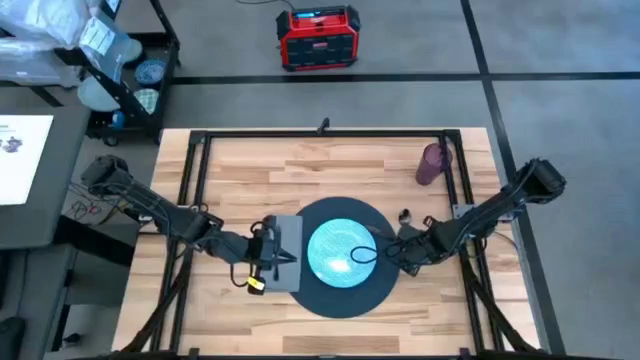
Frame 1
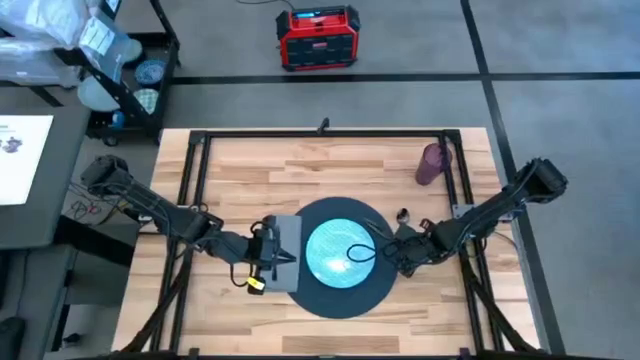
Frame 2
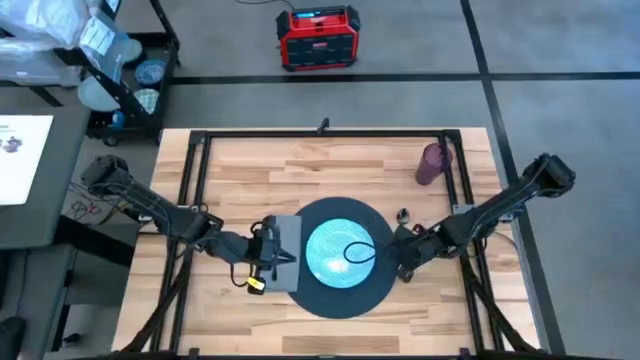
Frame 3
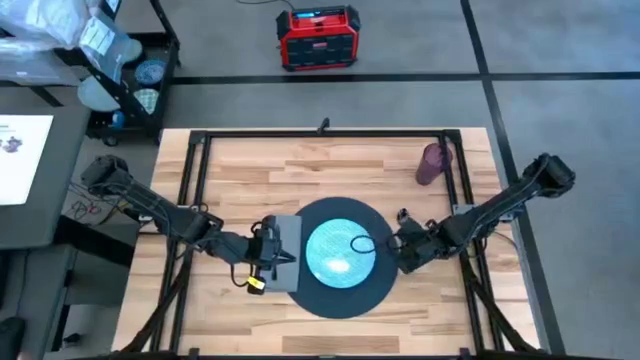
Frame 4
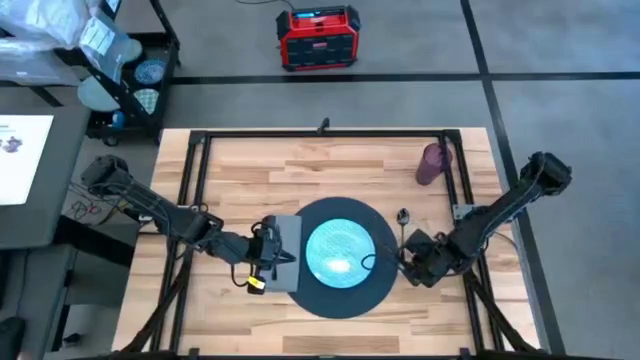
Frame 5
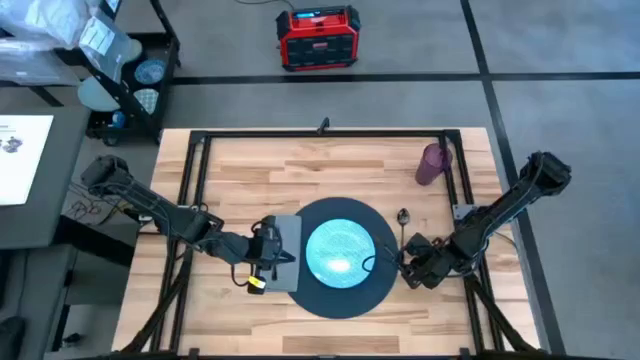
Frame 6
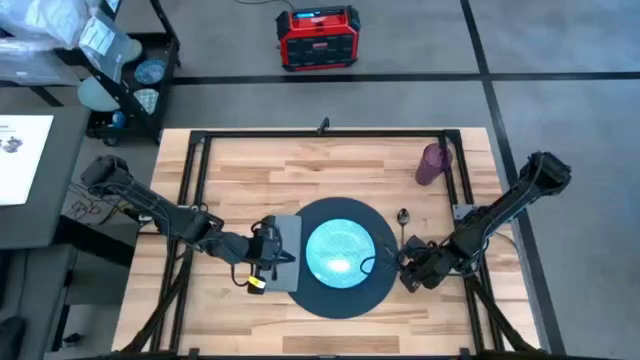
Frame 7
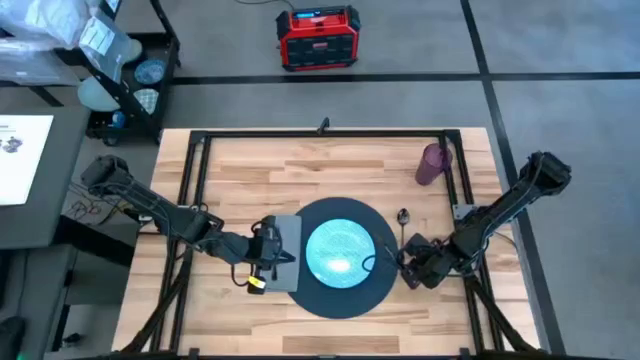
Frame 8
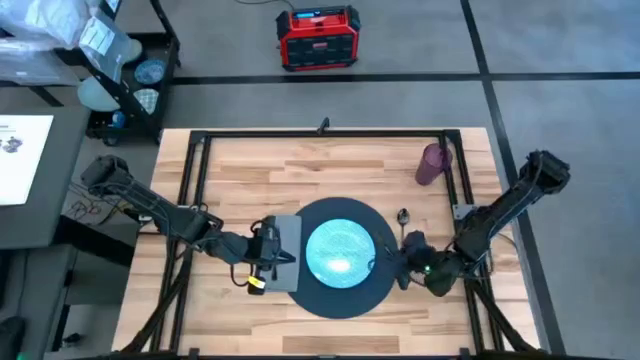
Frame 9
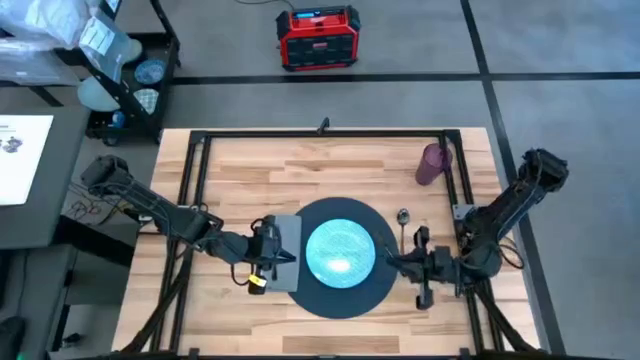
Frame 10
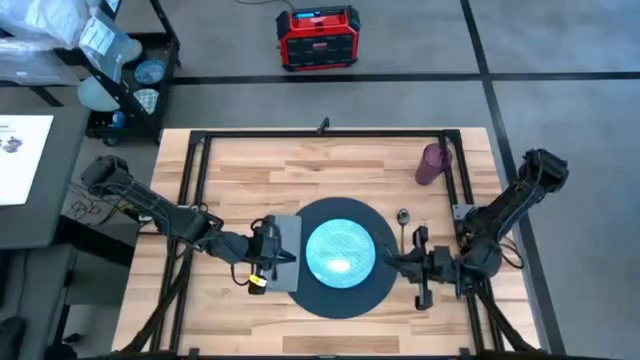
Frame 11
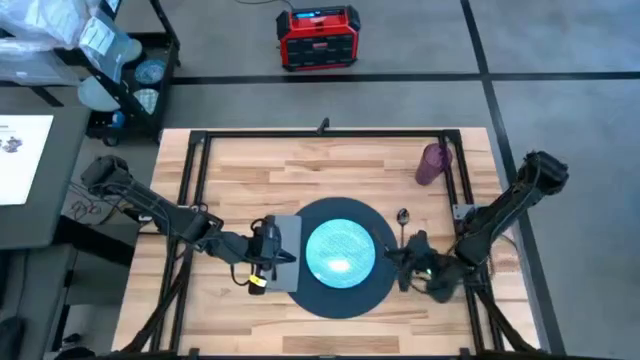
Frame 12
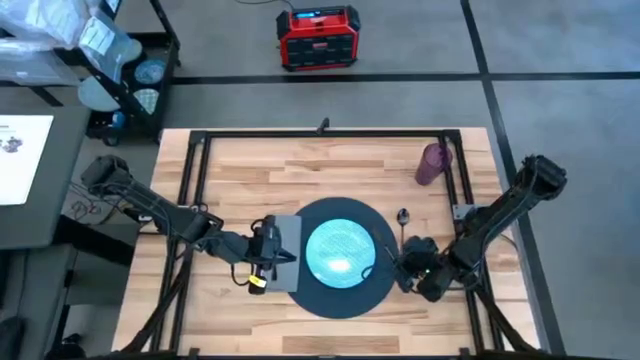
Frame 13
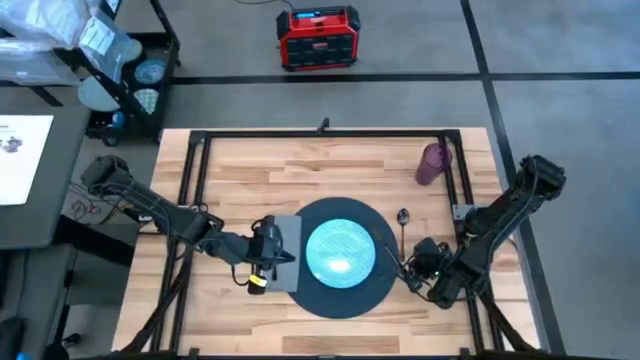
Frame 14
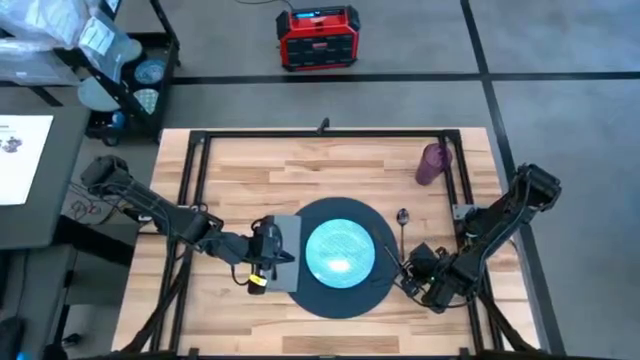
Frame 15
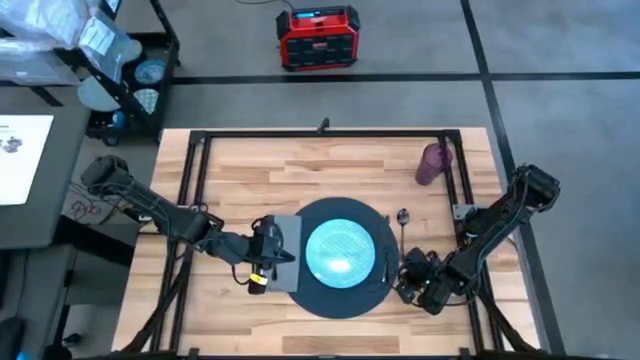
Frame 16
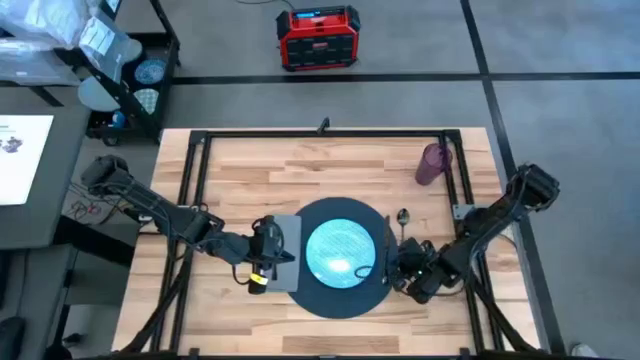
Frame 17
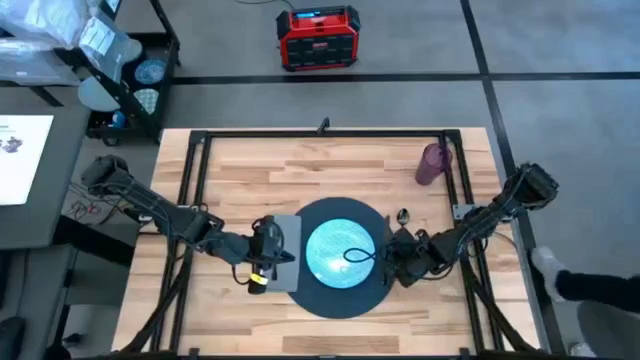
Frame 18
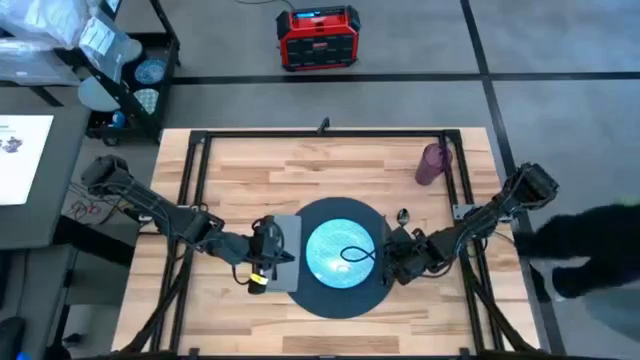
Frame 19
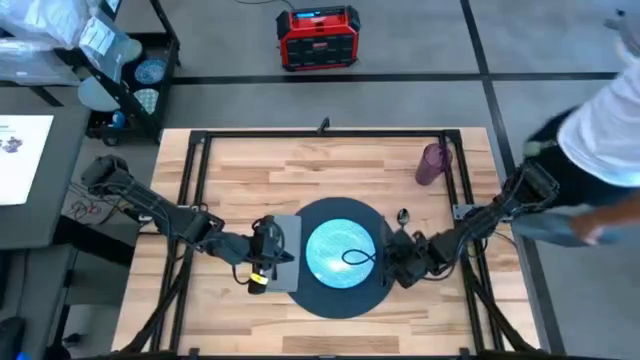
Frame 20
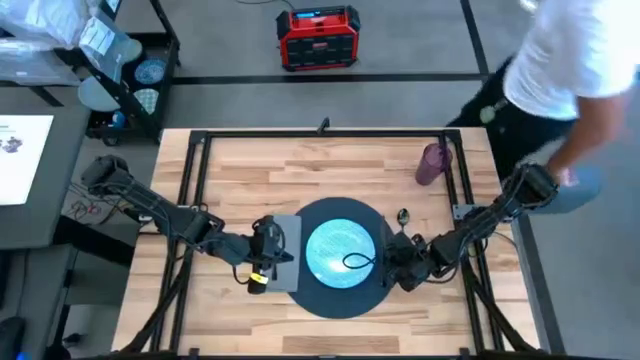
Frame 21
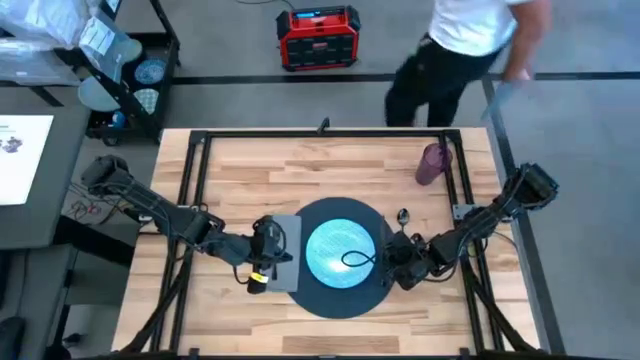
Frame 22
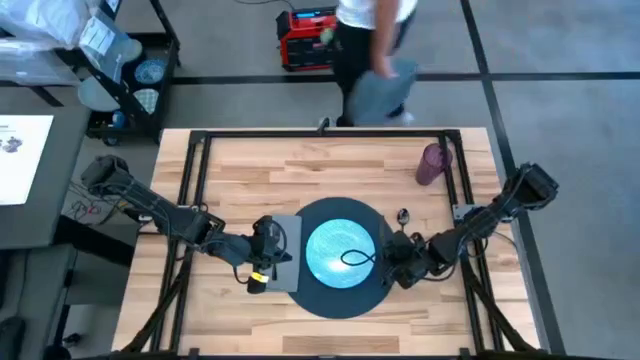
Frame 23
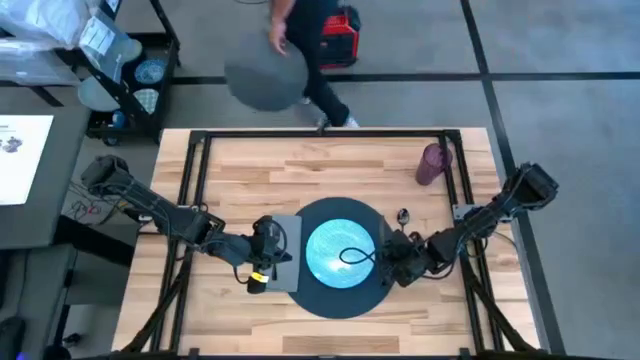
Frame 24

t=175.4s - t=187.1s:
Task: Set table place
Put the black table knife on the tablemat to the right side of the blue plate

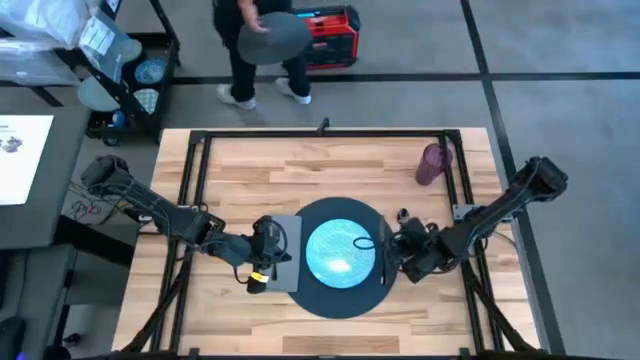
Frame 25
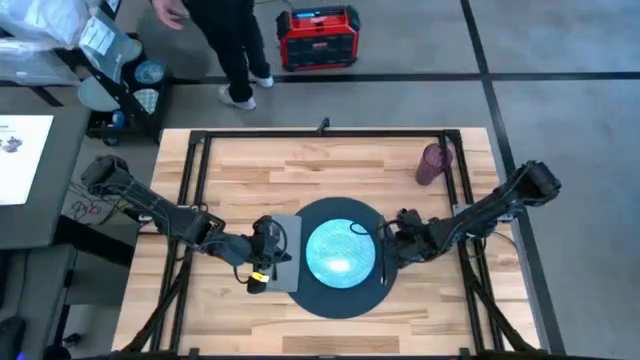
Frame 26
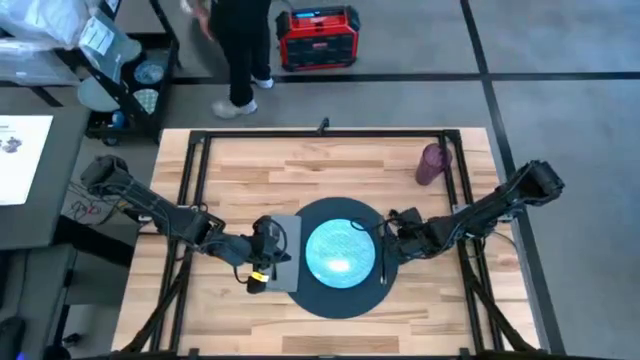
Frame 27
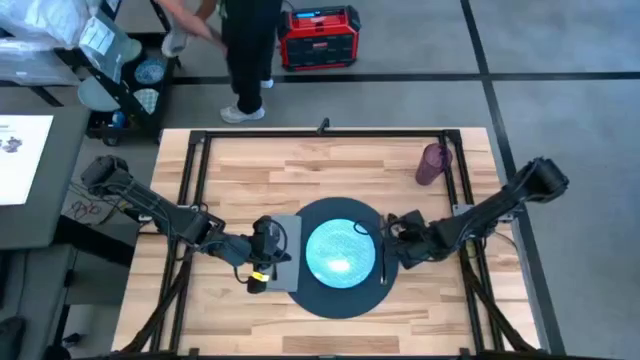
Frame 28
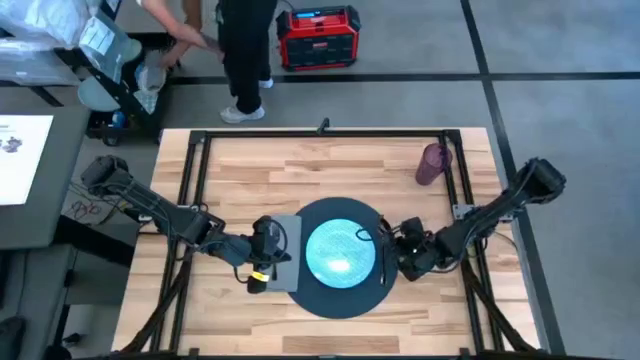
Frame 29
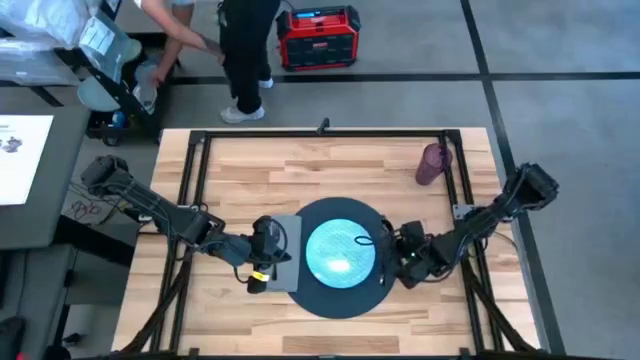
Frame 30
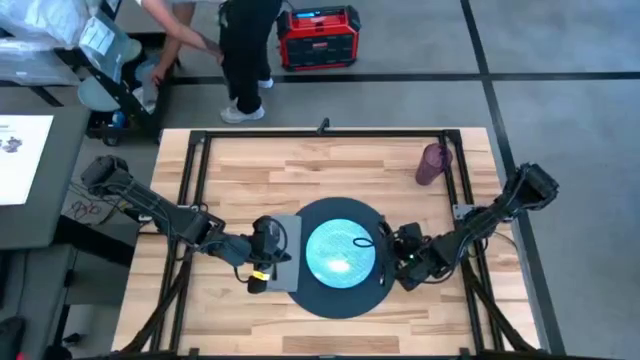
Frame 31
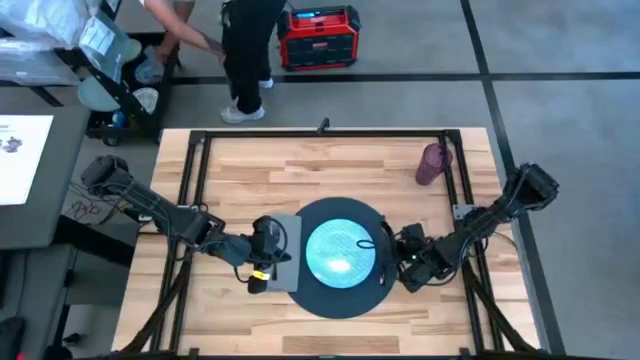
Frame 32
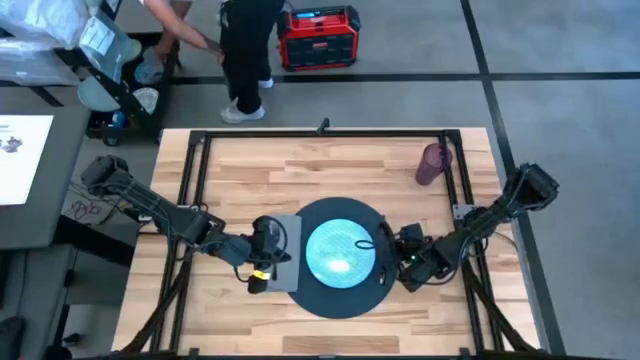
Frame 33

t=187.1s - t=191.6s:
Put the black spoon on the tablemat to the right side of the black fork

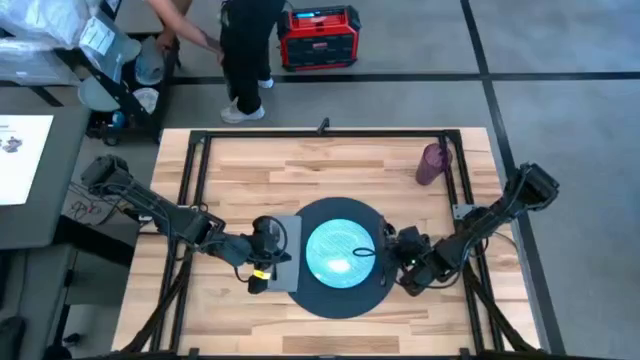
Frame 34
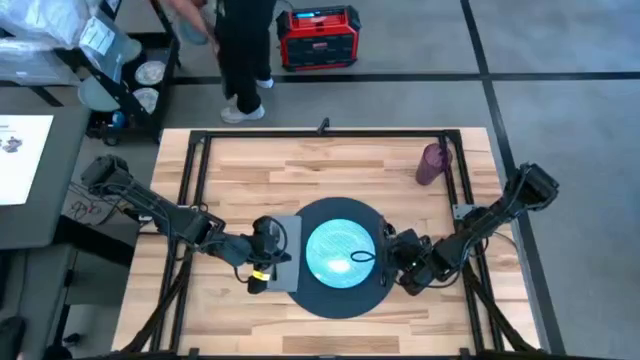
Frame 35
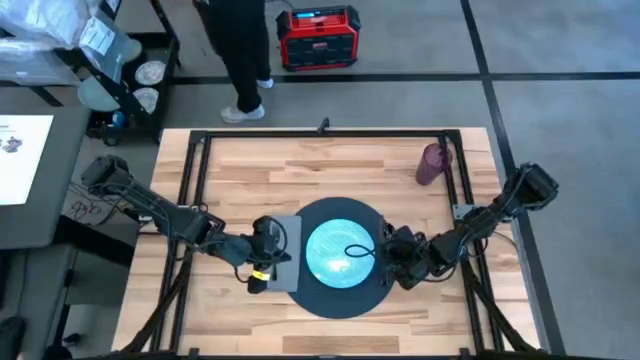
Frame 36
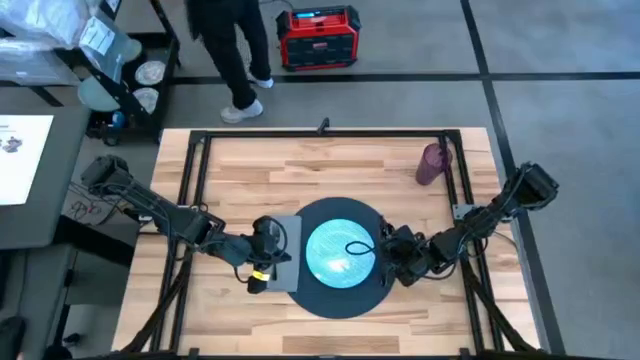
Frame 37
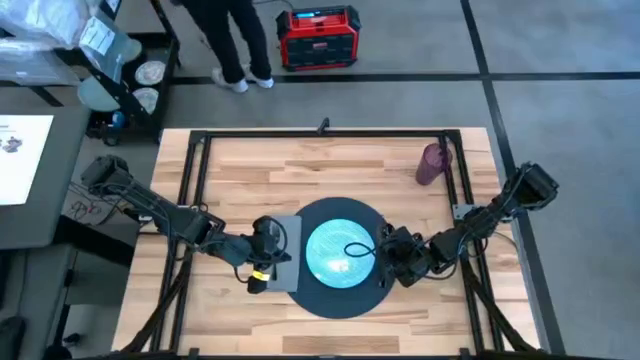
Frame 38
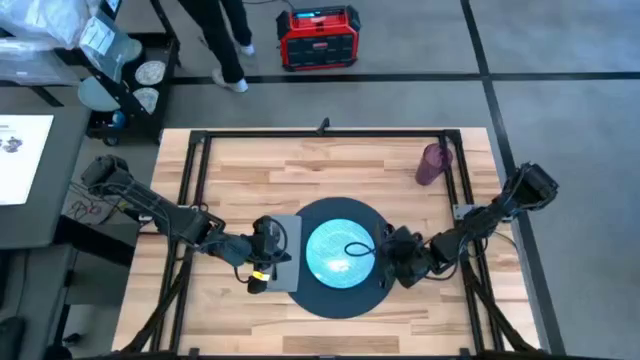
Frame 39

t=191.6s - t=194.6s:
Adjust the black table knife

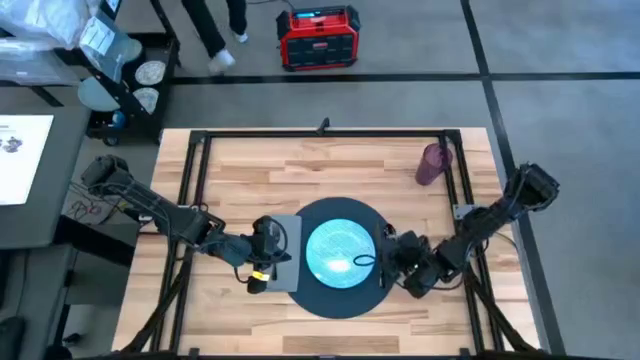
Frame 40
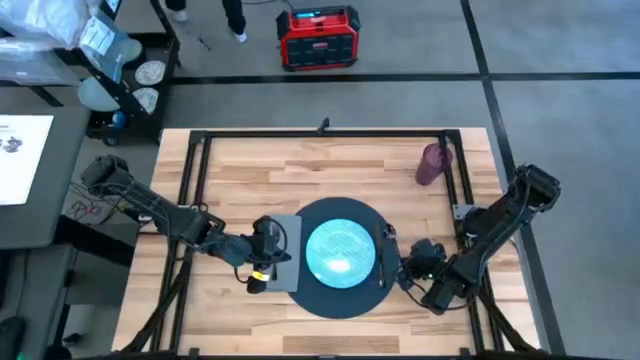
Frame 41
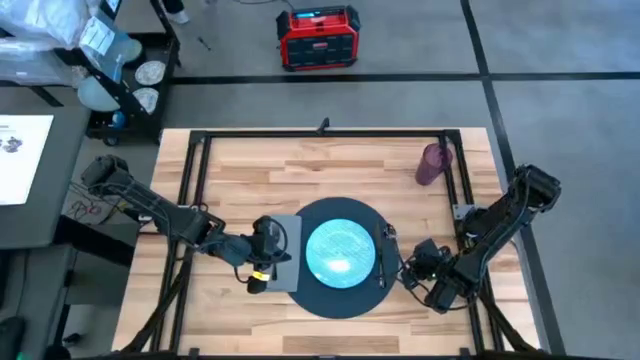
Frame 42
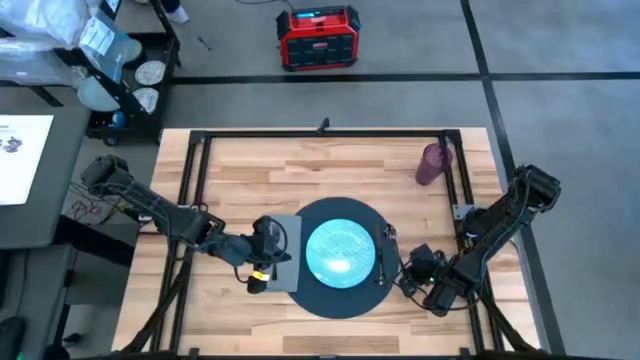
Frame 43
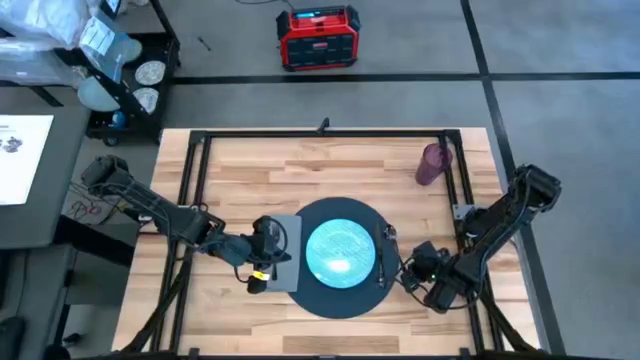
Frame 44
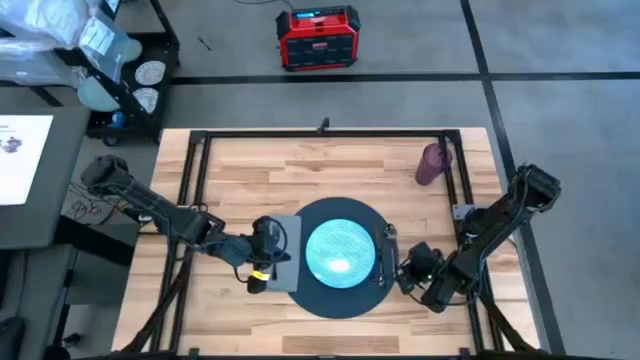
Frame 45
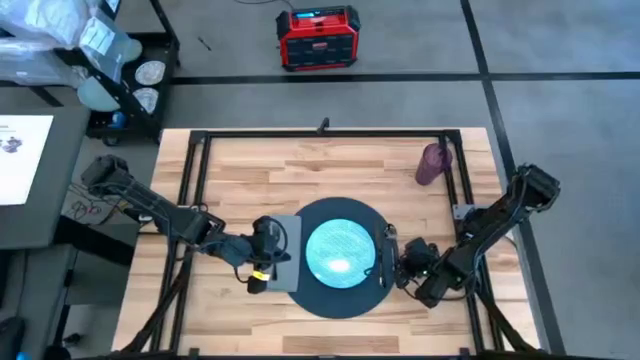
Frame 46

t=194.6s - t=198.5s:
Adjust the black spoon
